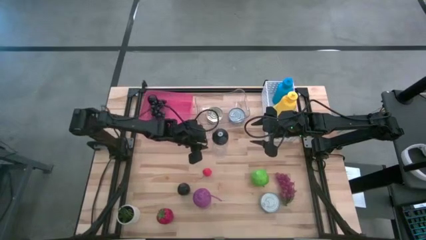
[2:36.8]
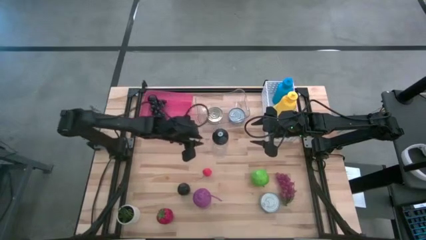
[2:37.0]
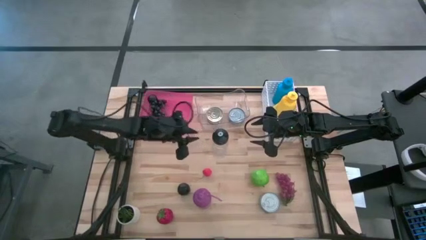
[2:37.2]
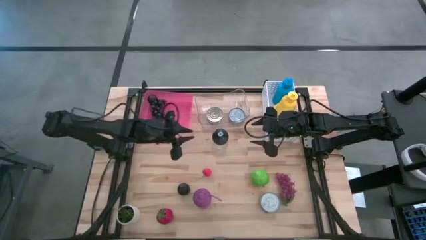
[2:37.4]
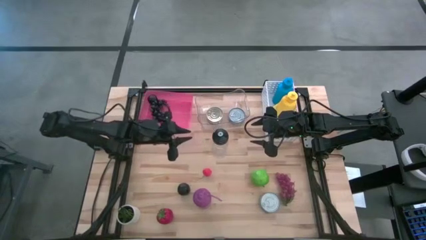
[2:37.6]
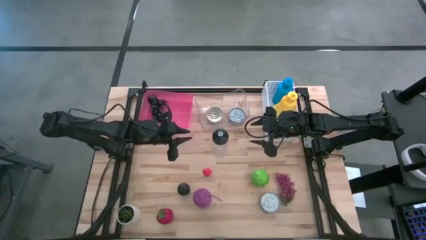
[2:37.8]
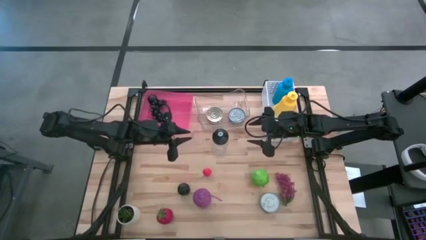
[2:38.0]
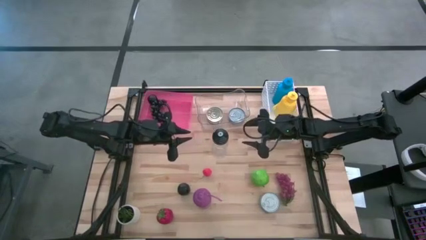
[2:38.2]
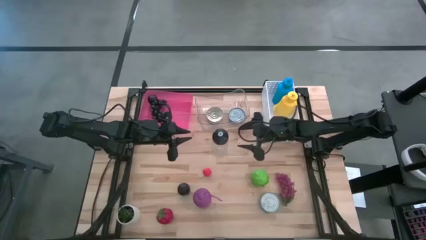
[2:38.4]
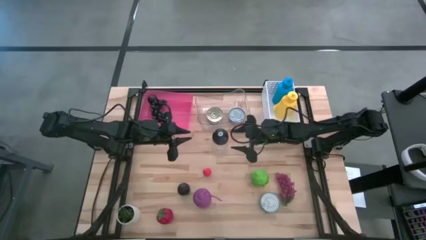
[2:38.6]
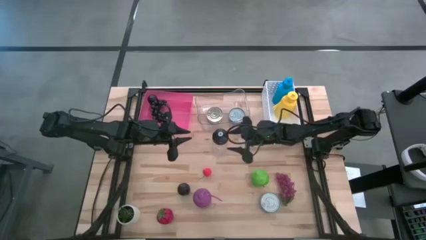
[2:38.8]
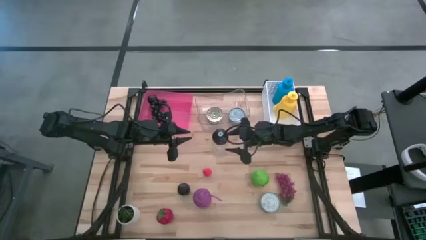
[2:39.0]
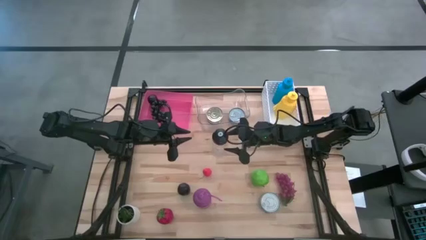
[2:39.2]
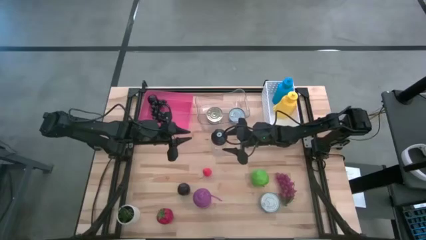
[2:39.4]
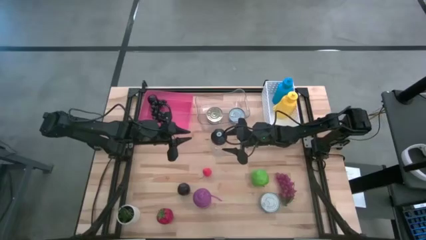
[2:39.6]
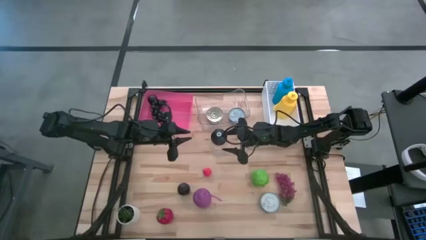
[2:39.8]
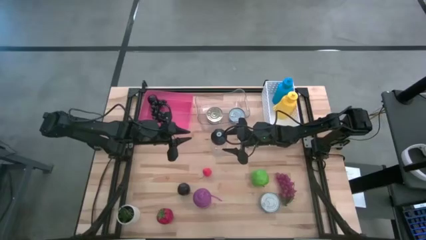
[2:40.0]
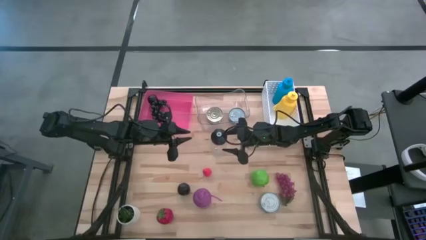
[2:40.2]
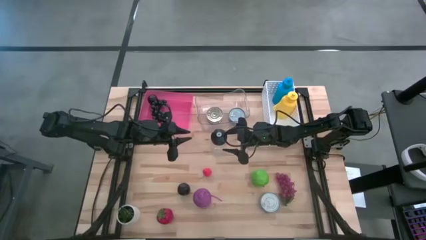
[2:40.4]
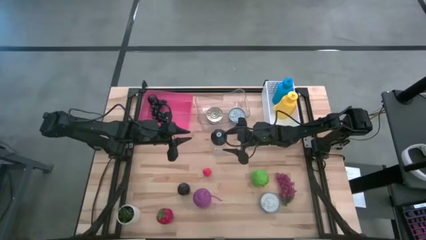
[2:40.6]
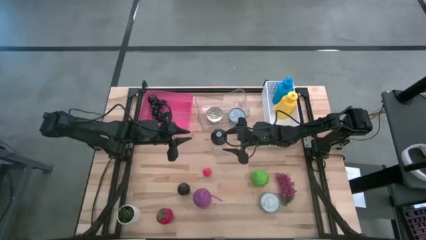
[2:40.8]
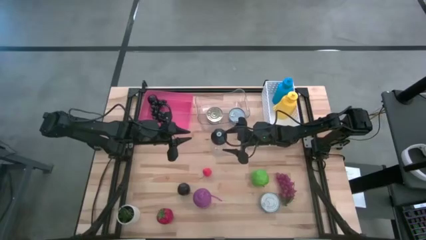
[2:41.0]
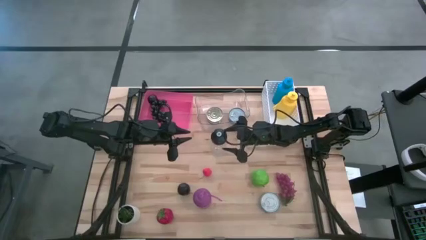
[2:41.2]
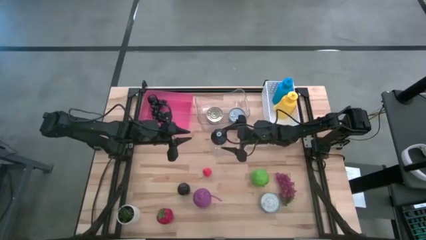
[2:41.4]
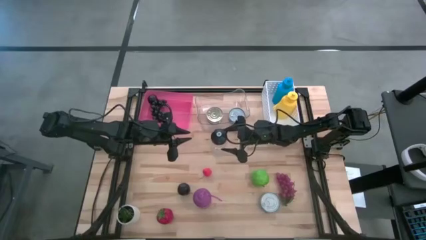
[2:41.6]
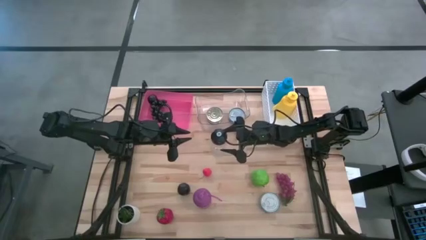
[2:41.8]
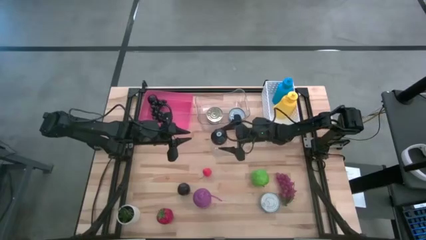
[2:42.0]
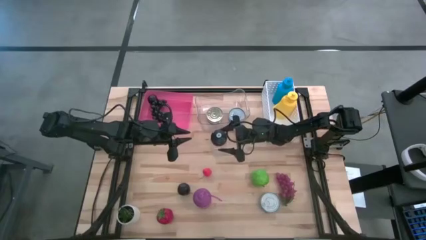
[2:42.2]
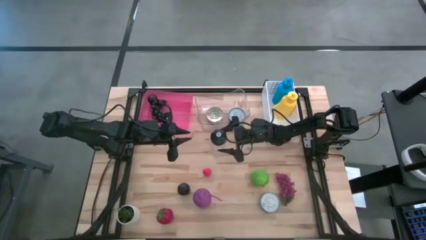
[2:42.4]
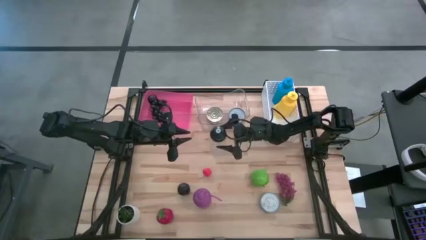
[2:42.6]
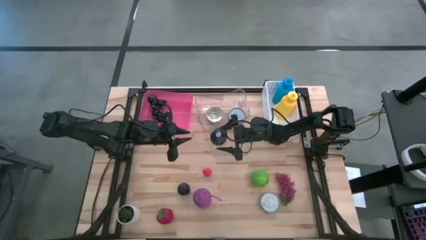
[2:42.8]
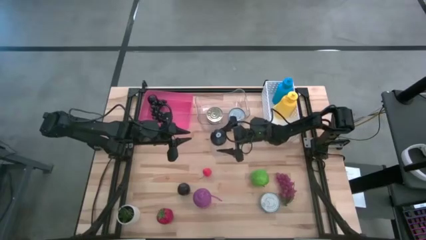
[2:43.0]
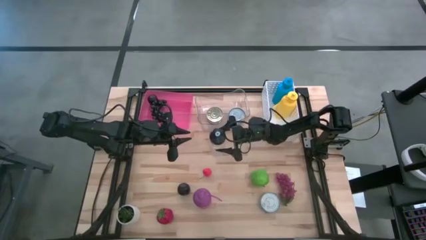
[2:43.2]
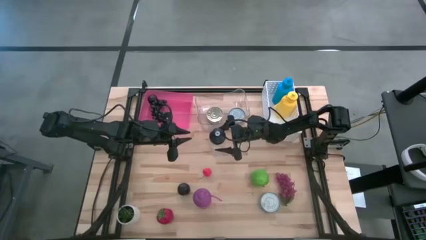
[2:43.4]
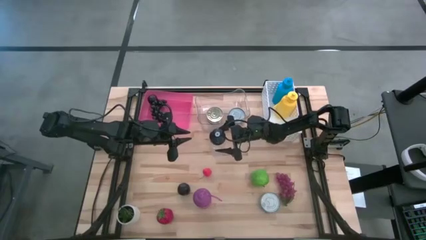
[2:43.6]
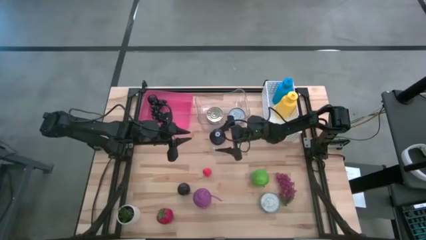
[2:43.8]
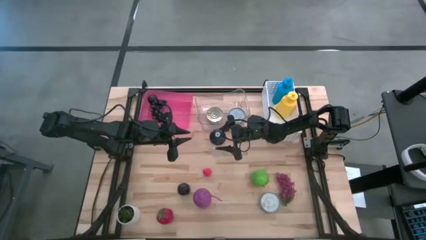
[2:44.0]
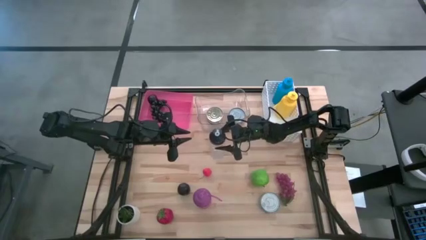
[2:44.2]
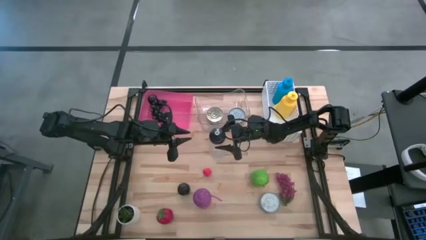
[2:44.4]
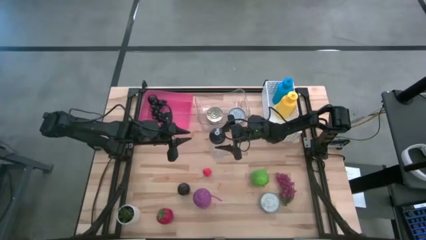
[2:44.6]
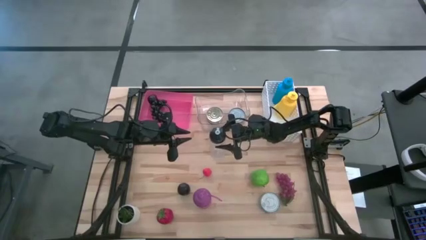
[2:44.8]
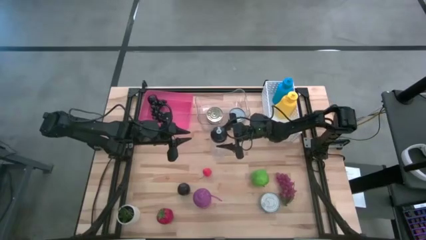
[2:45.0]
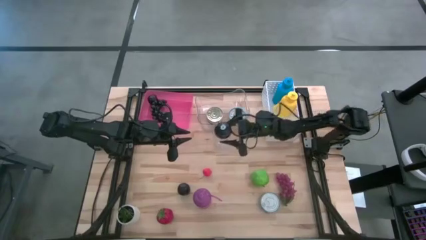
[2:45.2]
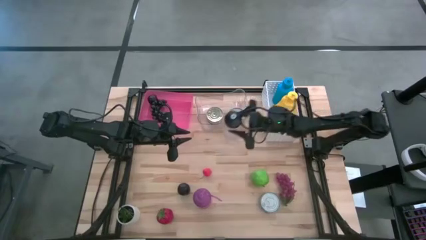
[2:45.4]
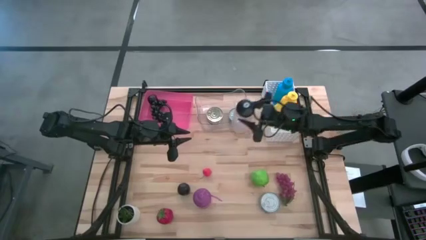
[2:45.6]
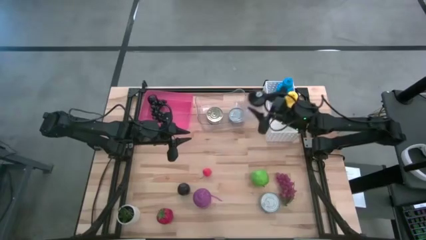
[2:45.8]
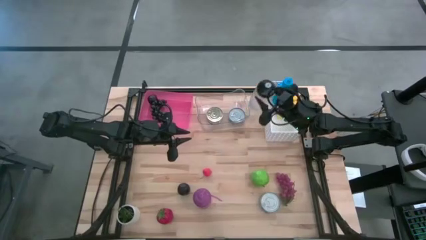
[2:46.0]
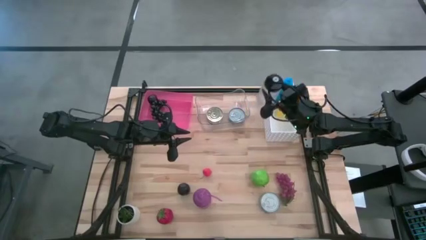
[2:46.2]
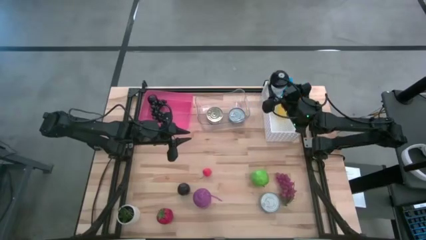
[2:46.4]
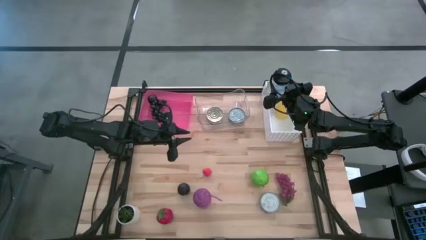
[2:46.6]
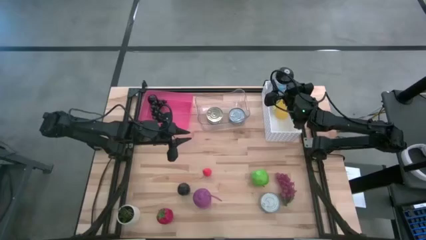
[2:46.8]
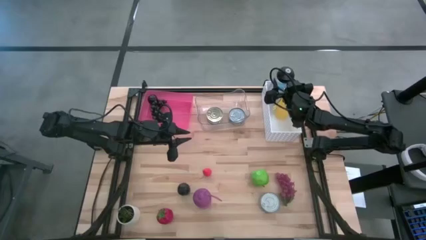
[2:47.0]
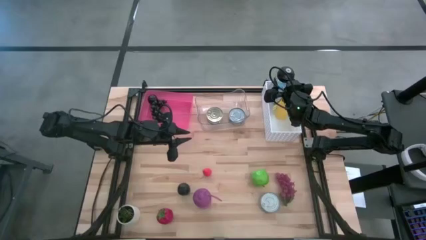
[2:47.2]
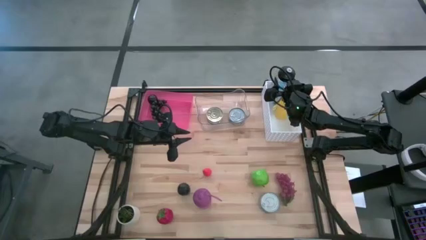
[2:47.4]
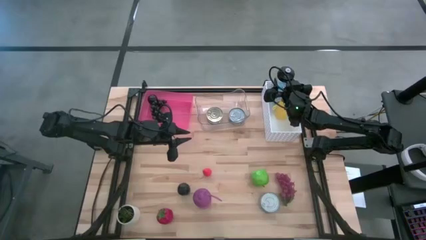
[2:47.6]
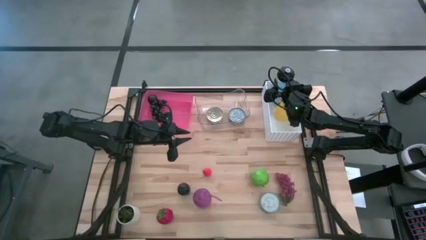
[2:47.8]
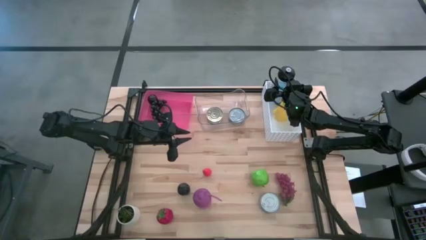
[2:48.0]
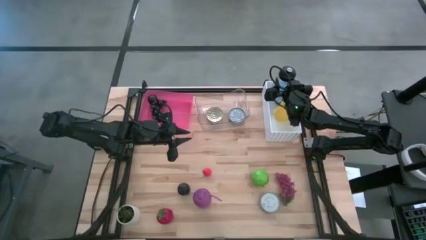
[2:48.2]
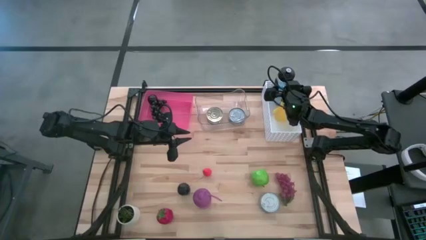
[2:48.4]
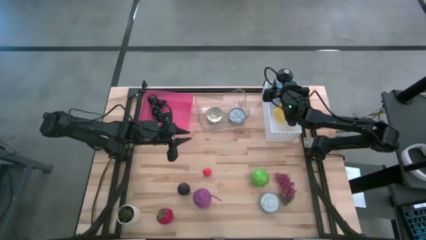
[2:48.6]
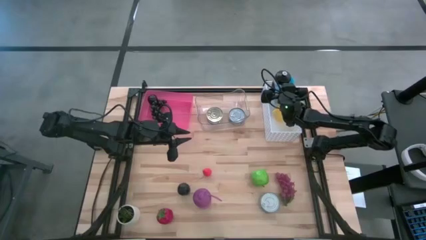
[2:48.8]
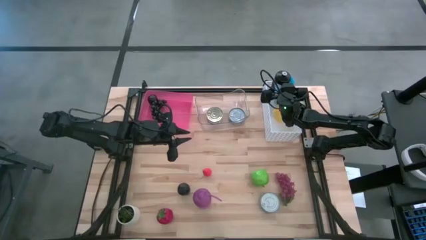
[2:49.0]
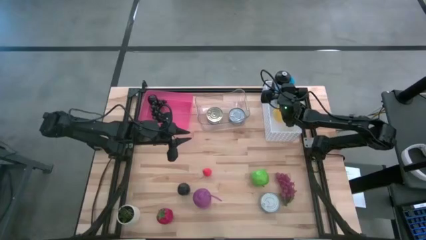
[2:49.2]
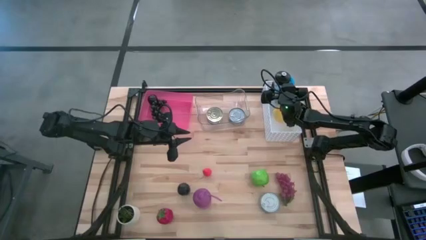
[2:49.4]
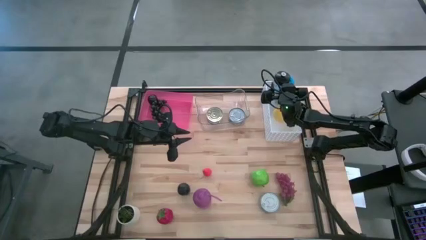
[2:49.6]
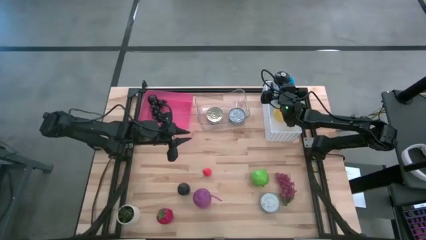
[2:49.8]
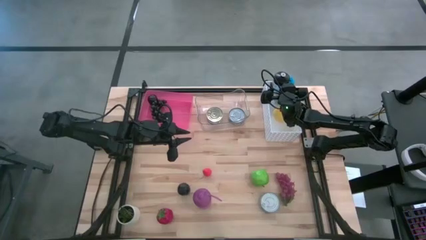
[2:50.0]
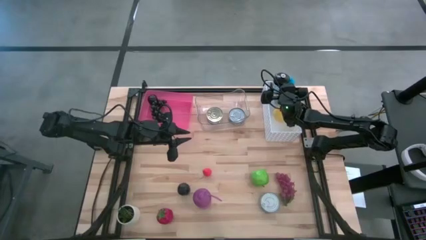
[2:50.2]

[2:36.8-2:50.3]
Task: Pick & Place Food Item
Put the black water bottle into the white bin
